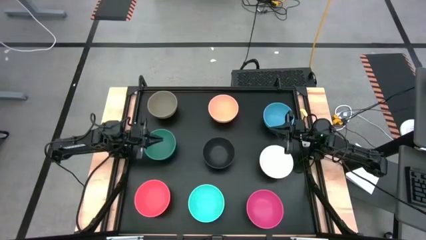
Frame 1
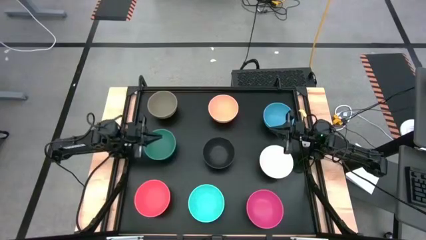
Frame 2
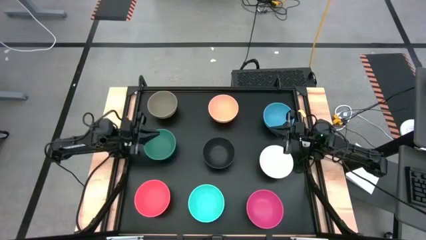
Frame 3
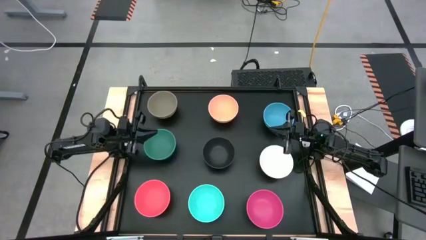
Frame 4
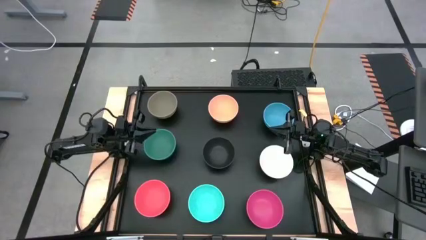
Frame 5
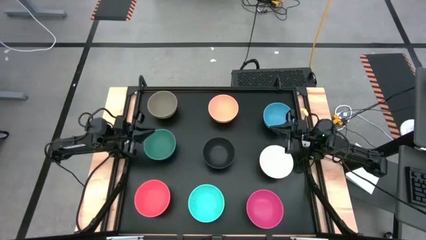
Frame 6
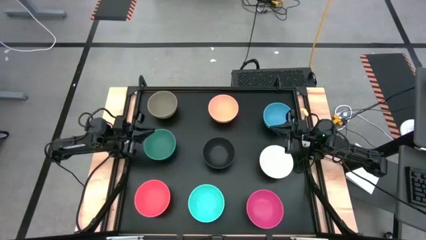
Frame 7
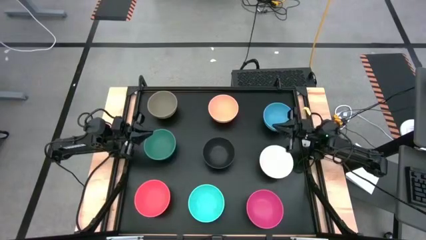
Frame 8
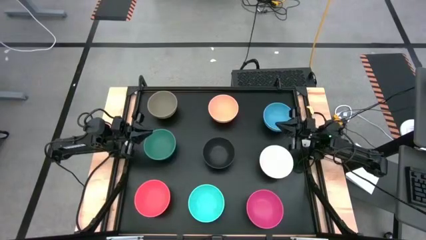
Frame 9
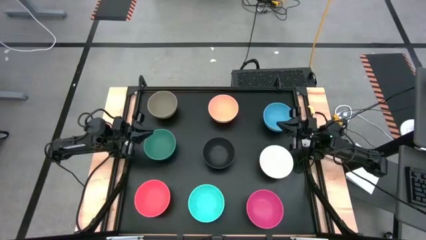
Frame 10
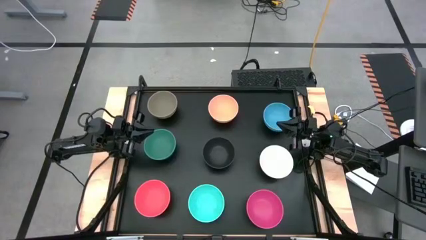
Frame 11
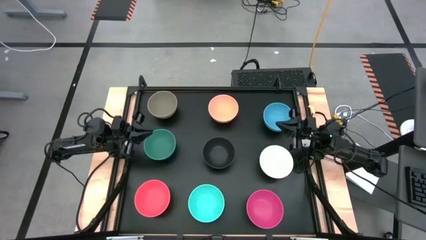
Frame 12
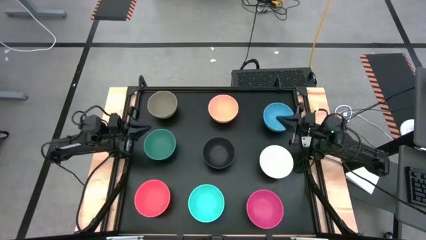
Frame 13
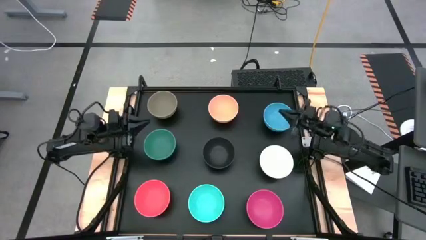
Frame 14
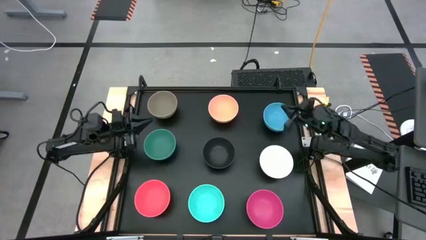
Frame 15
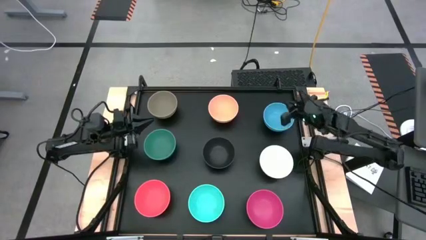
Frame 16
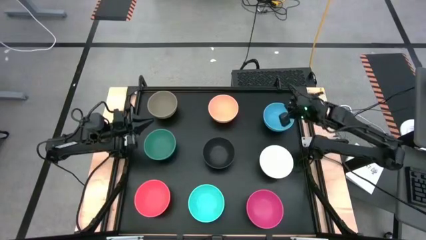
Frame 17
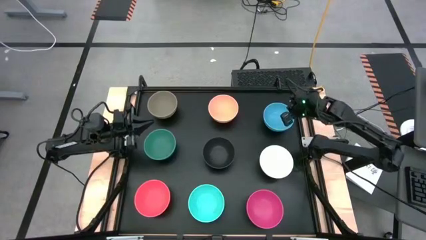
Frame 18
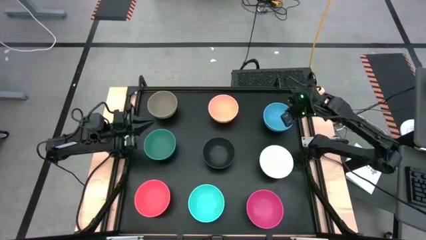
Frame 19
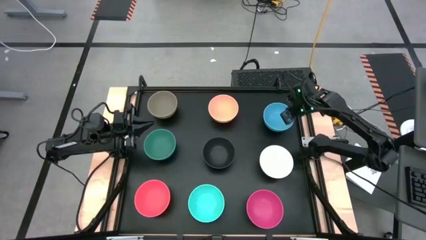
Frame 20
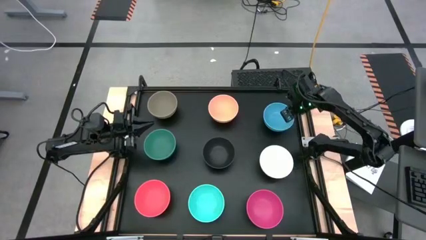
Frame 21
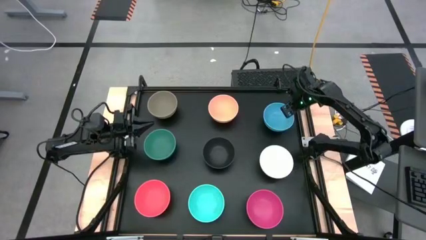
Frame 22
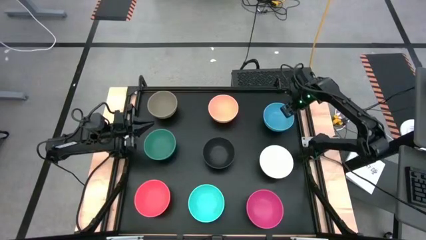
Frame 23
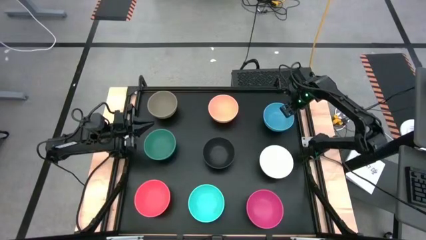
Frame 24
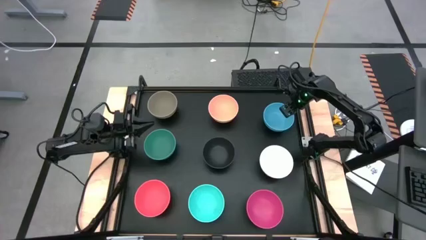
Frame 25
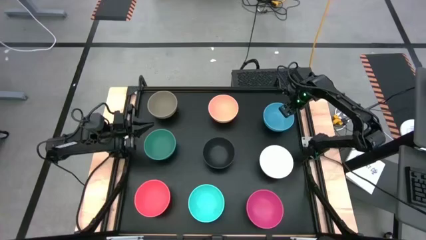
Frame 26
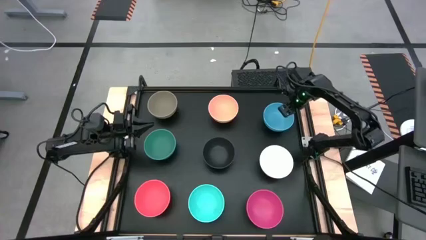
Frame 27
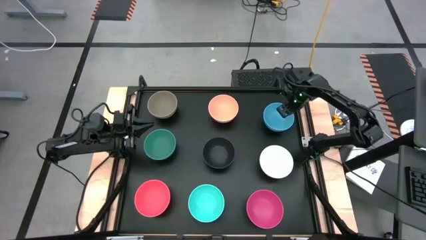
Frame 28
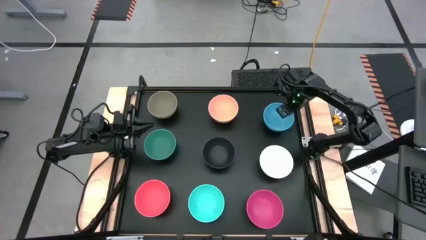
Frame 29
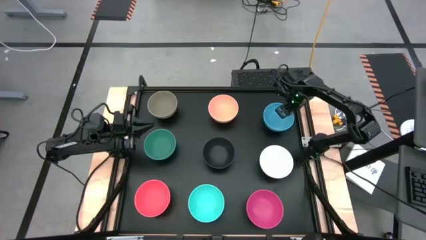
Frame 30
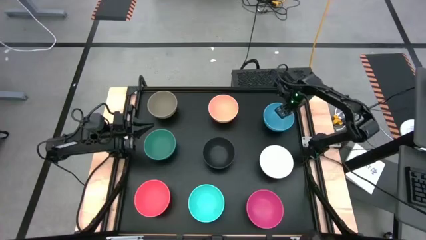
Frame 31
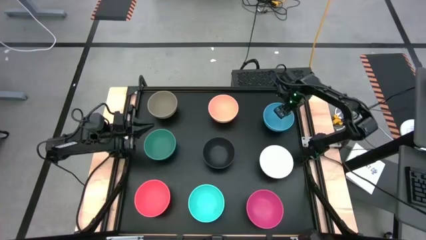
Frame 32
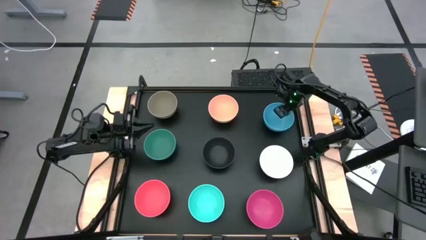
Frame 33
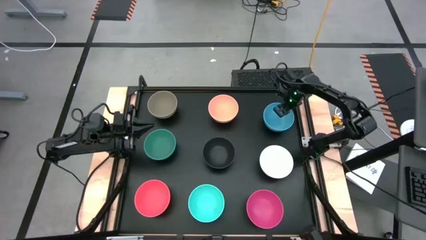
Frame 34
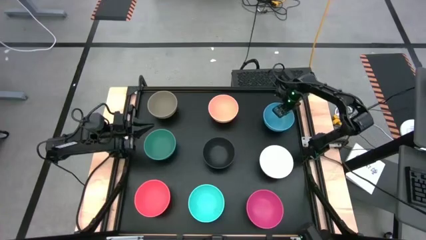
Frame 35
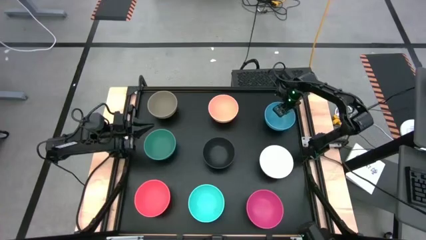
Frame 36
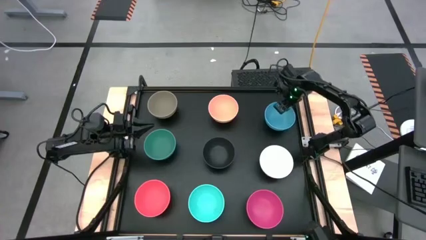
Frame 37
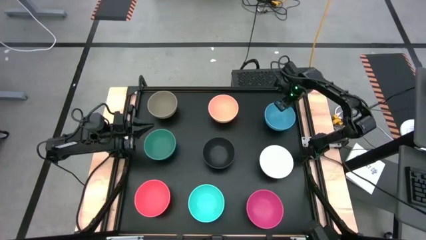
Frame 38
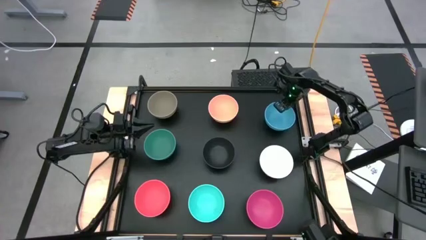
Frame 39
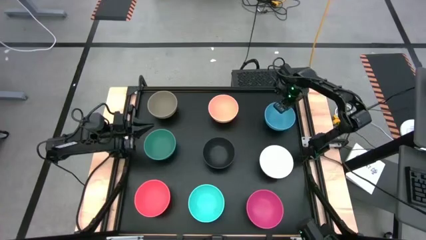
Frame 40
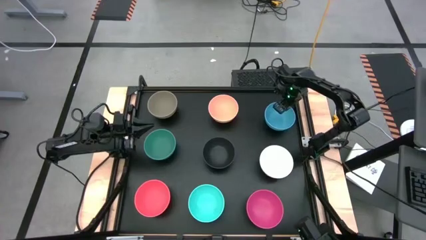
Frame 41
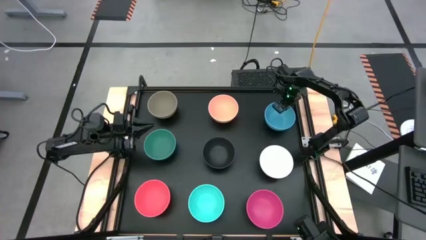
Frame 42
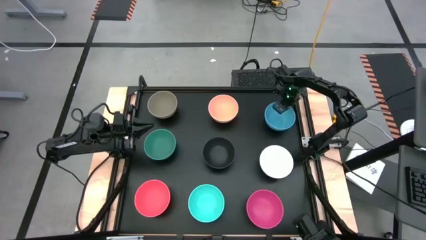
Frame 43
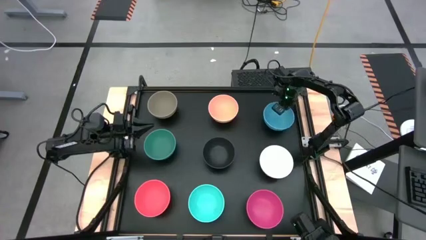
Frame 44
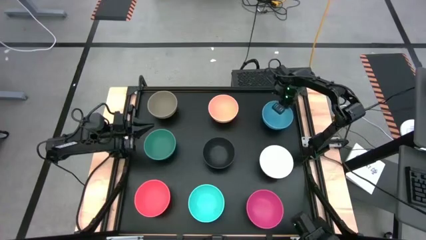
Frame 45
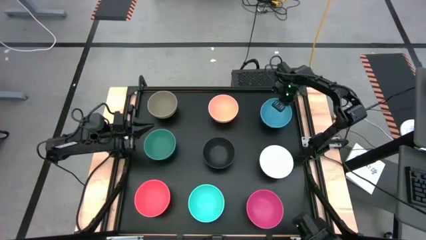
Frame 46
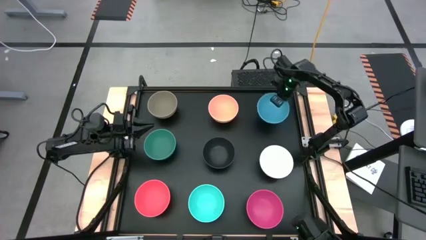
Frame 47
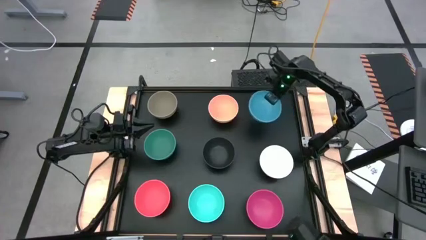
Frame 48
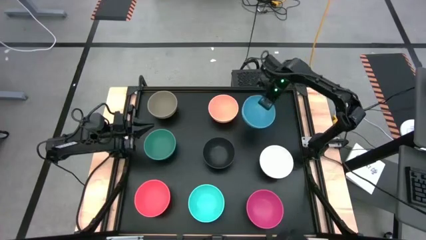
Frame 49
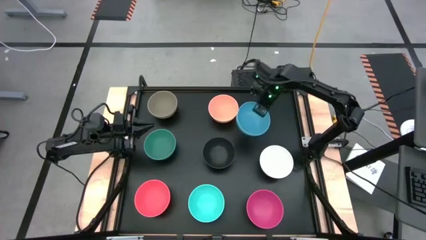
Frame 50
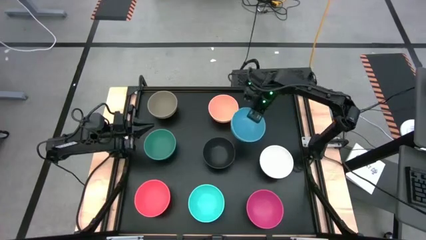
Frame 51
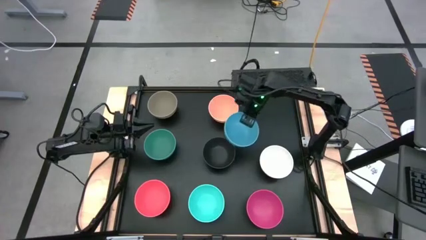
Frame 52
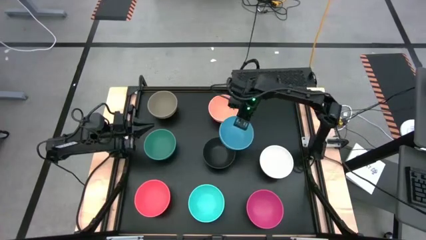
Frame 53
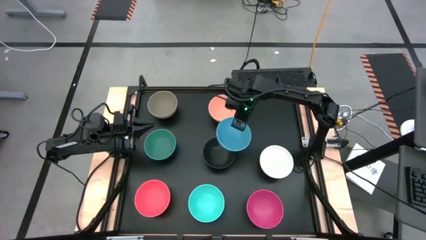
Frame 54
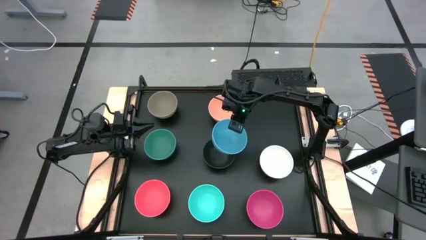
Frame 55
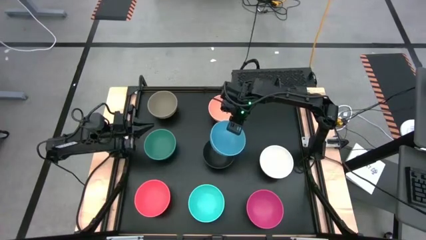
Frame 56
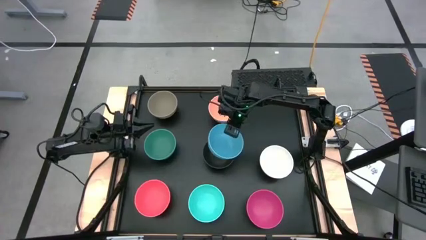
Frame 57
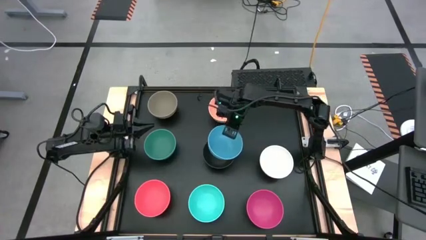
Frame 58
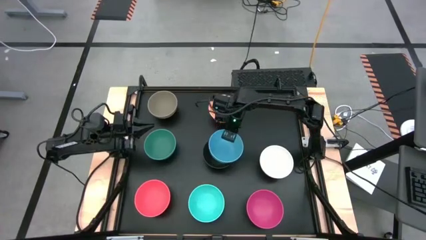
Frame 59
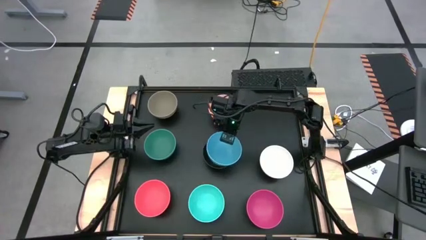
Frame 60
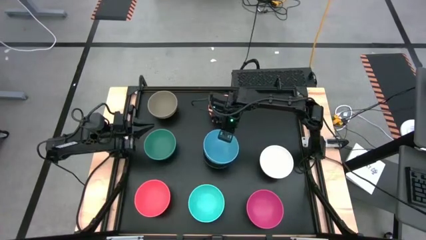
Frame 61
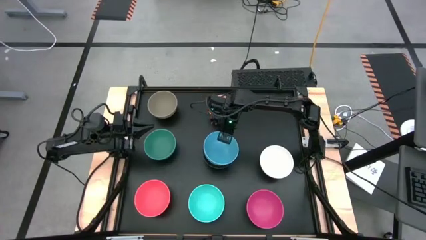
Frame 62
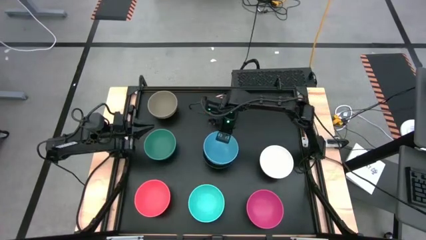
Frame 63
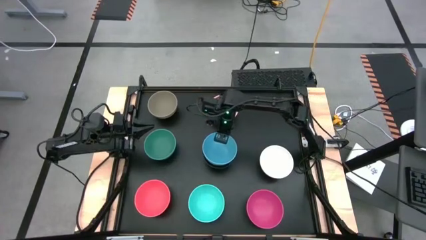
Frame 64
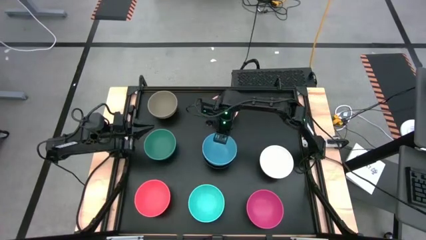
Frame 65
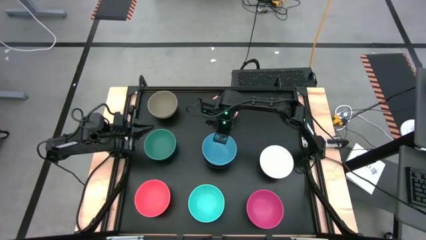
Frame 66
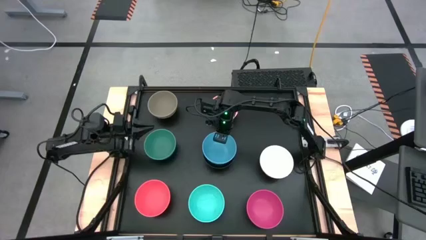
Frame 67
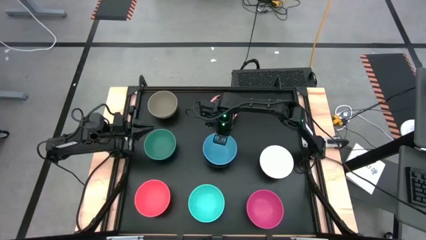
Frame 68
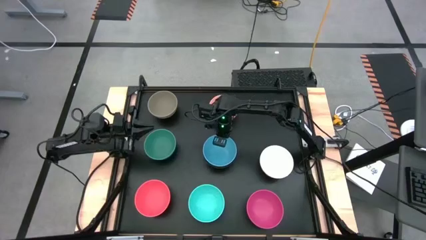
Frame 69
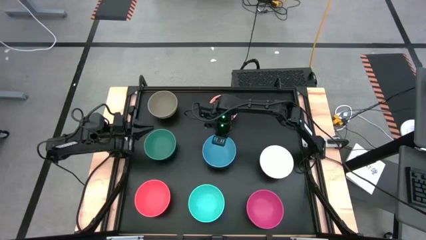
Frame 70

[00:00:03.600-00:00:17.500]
Task: Nest bowls inside each other
Stack the blue bowl on the black bowl

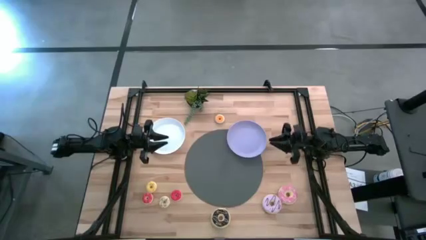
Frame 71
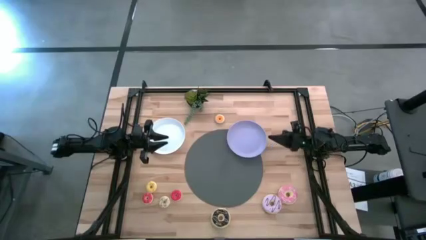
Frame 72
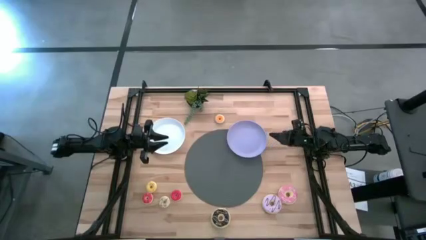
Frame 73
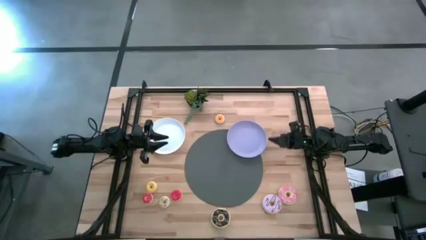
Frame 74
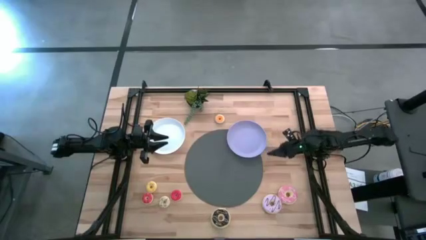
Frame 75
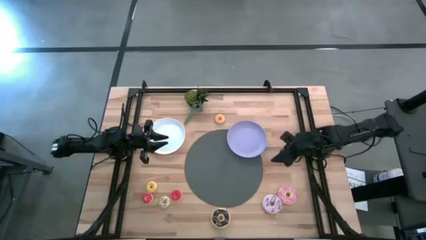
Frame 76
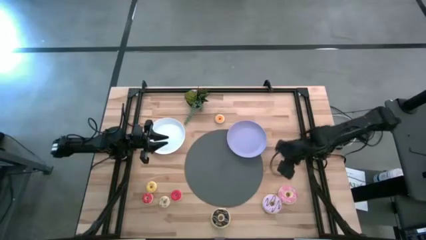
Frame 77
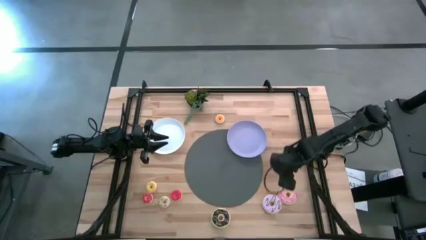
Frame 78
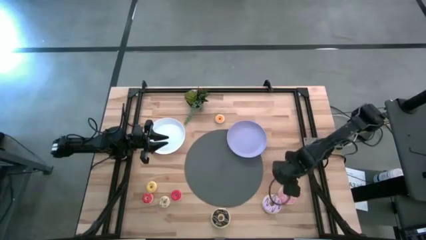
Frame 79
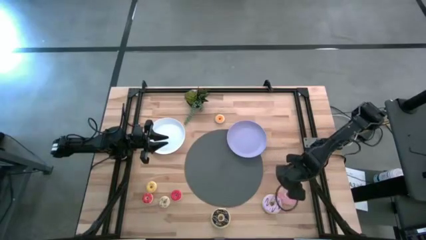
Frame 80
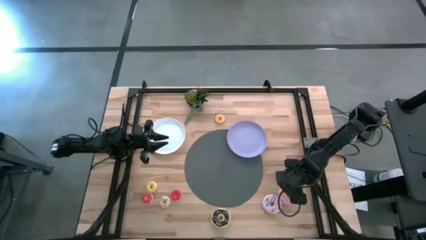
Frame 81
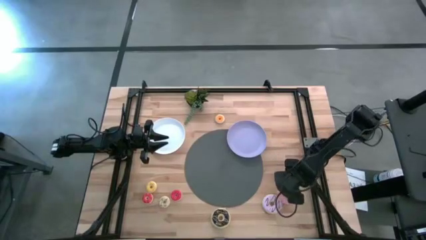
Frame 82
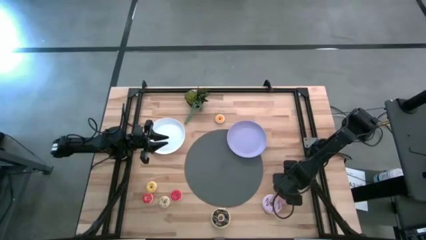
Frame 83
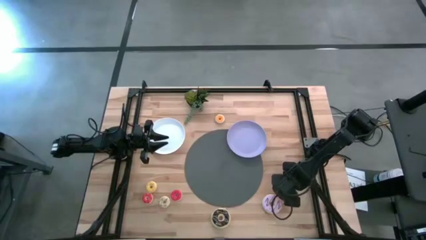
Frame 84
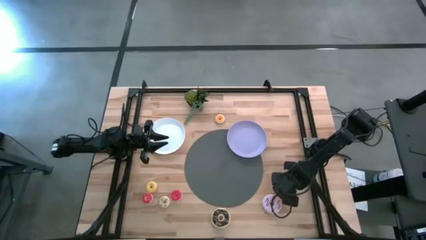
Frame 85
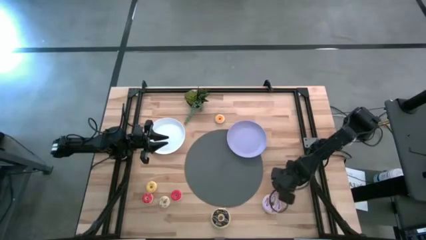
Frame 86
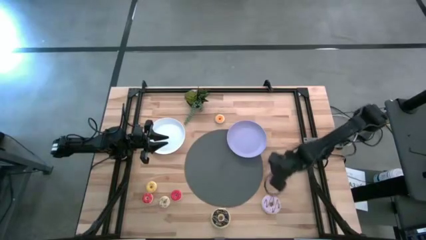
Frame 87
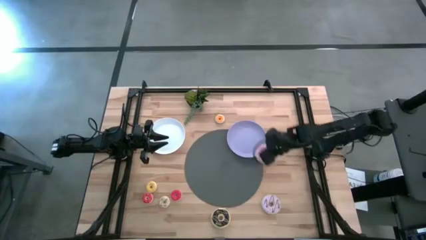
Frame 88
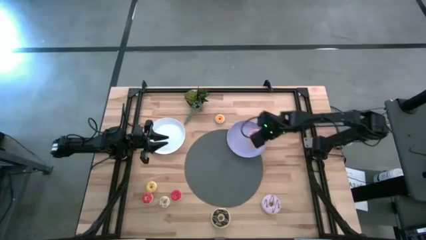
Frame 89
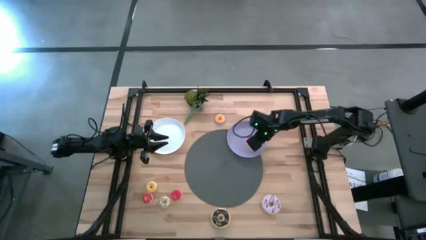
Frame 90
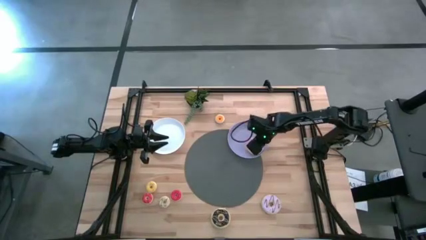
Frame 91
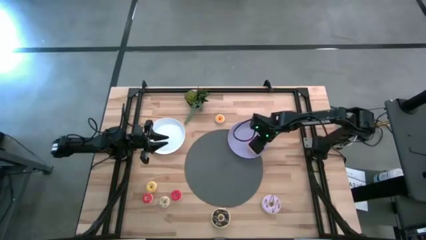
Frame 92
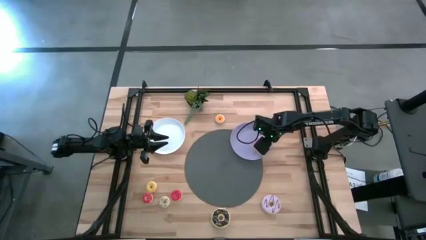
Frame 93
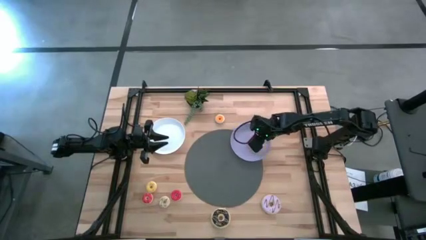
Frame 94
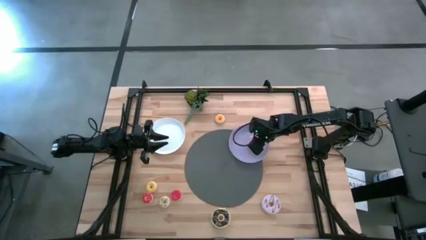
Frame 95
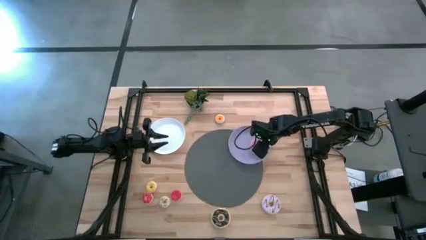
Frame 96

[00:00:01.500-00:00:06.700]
Task: Pick & Place donuts
Put the large pink donut on the purple plate
